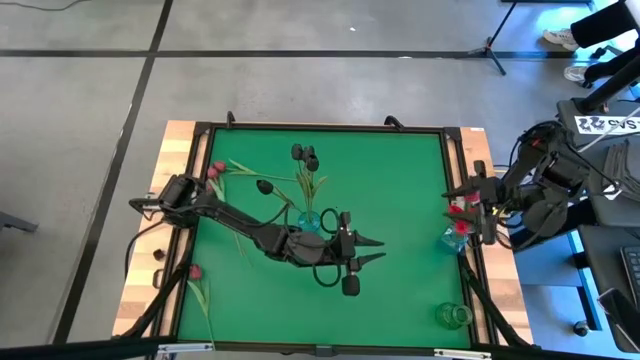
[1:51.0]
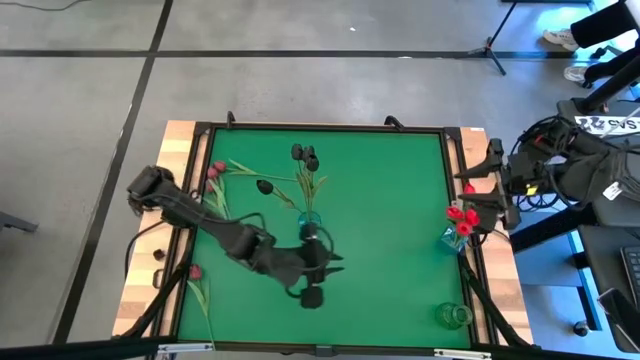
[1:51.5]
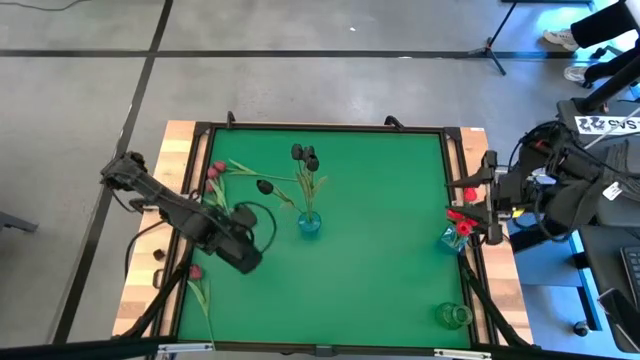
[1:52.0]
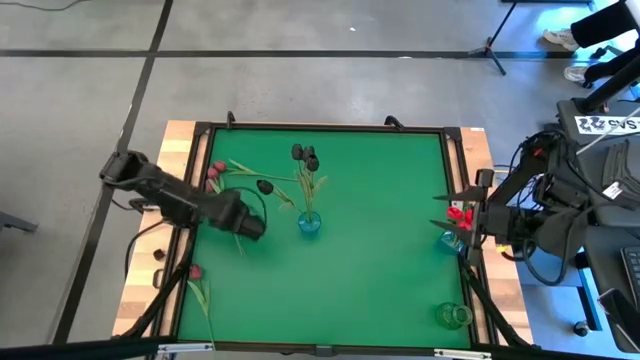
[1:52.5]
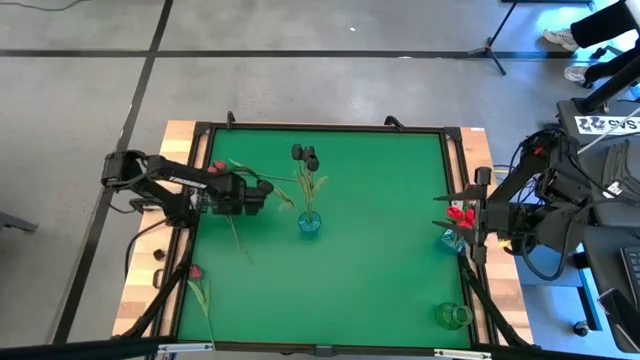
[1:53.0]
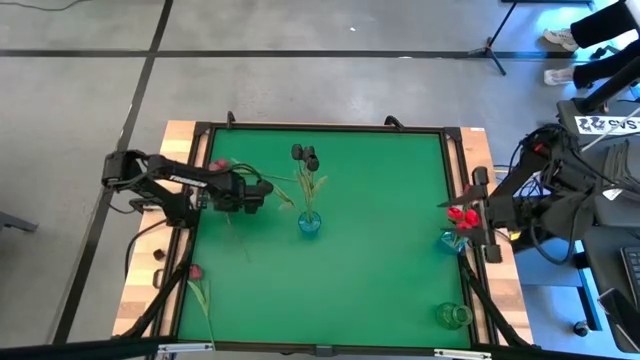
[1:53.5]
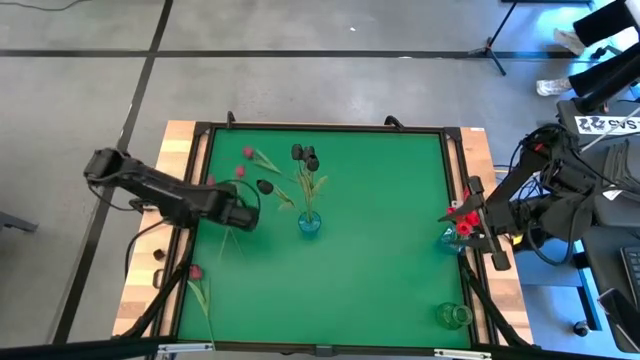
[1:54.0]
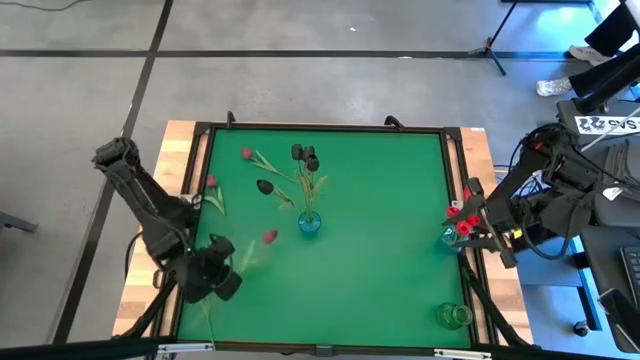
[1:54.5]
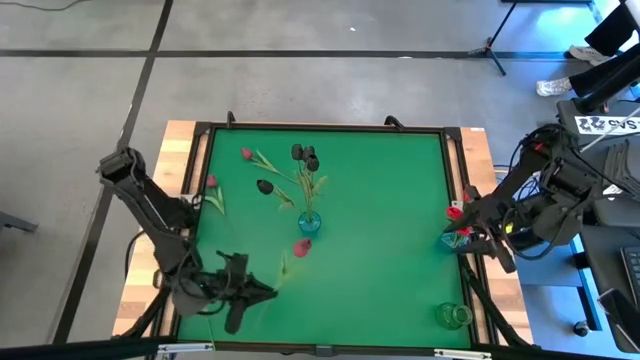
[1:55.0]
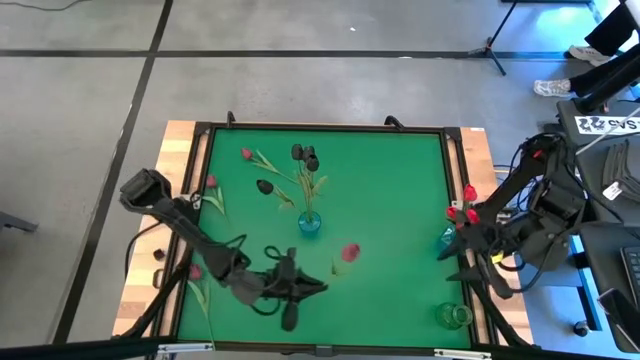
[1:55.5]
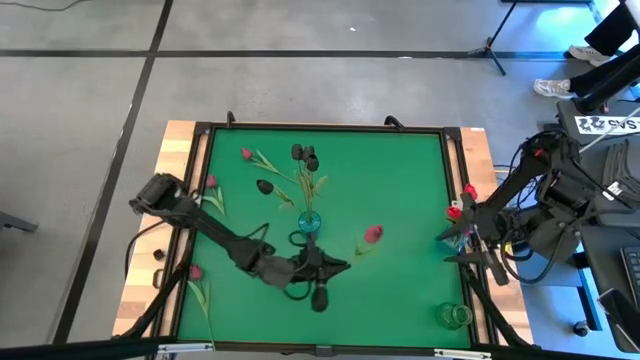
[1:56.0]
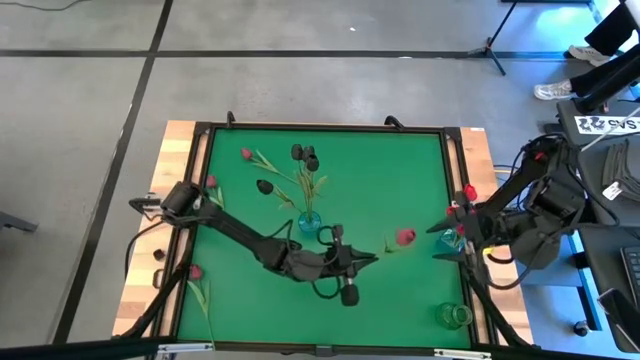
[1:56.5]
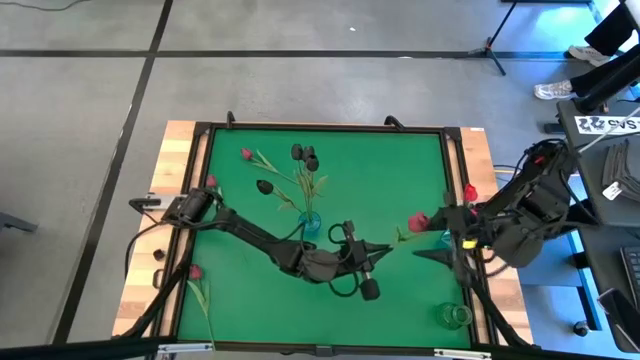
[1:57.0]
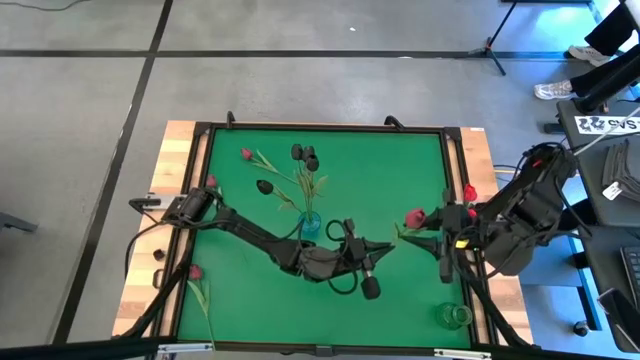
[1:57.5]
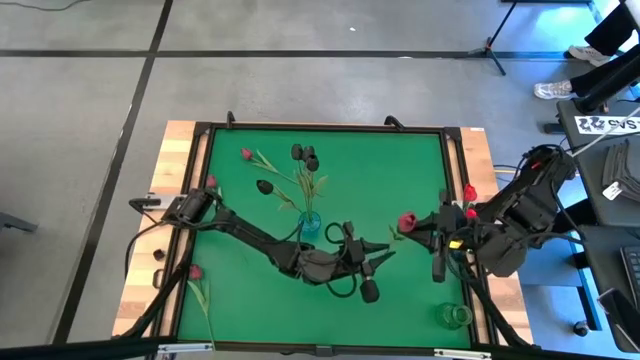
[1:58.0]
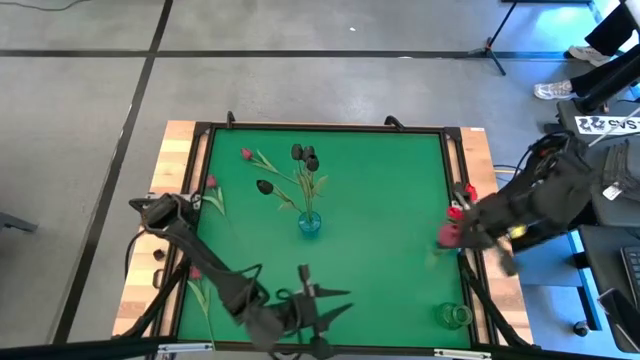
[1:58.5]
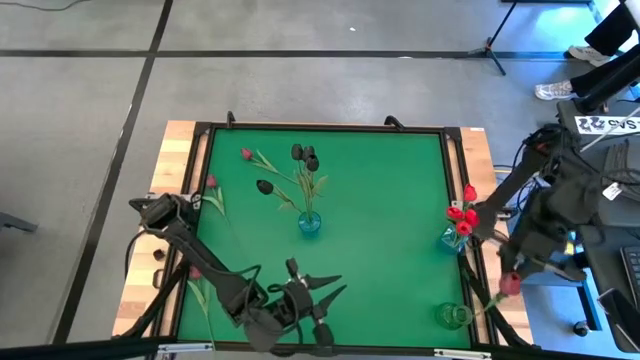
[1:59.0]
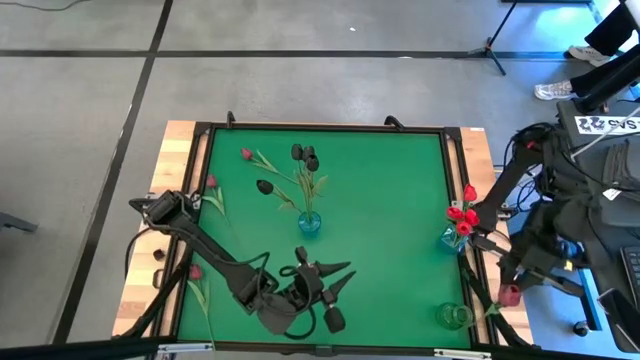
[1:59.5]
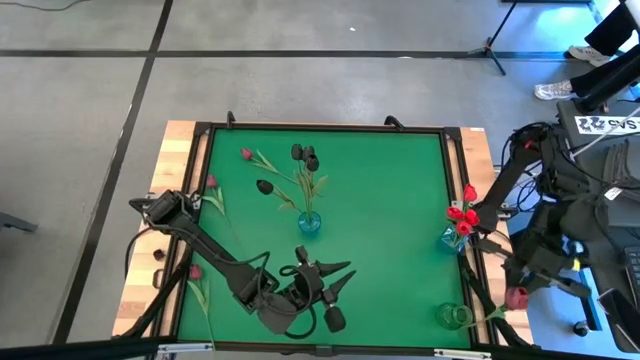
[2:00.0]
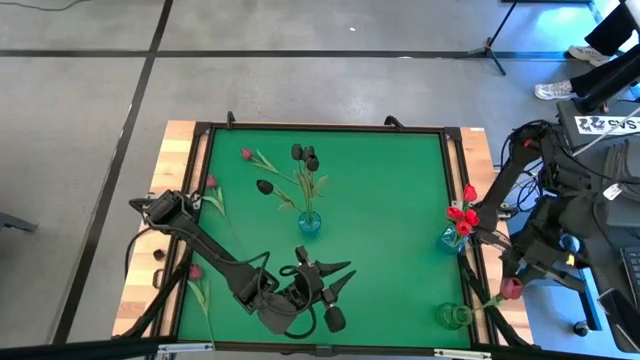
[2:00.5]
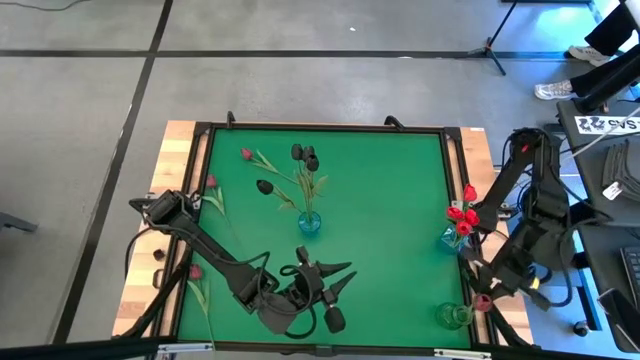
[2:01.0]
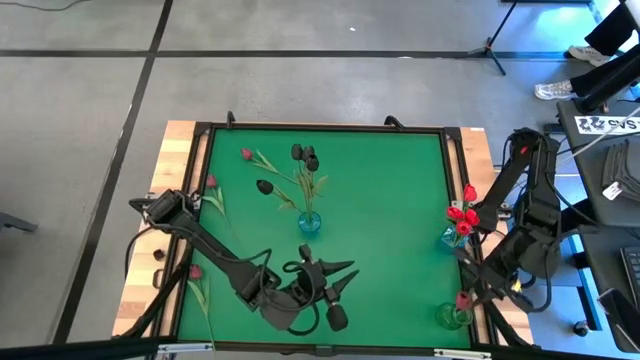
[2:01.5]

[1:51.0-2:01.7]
Task: Sort flowers into vase by color
Put the dark red flower into the green vase

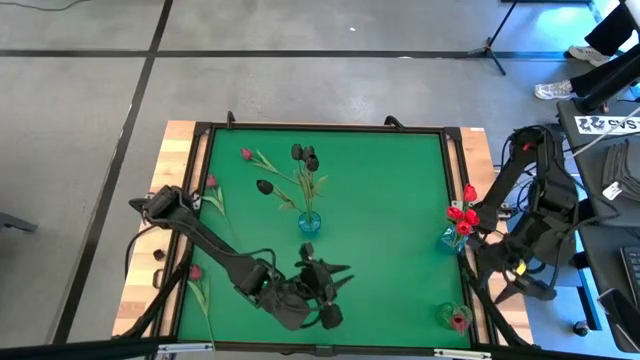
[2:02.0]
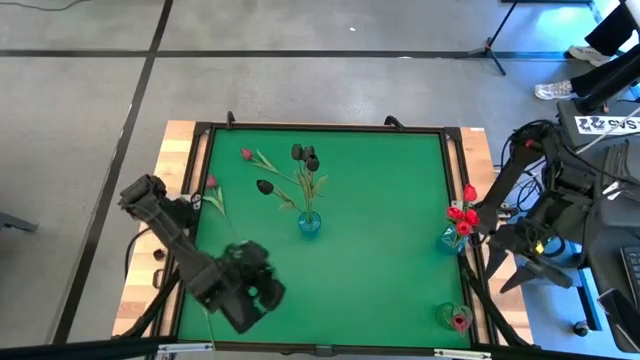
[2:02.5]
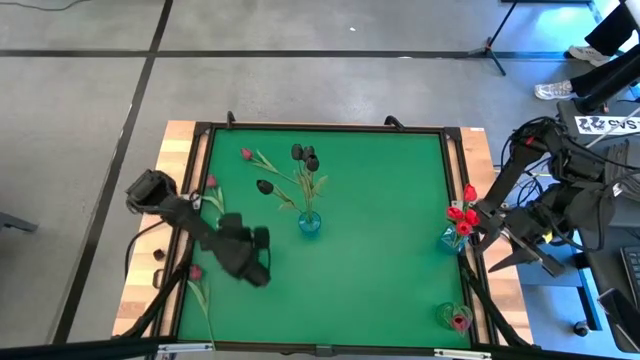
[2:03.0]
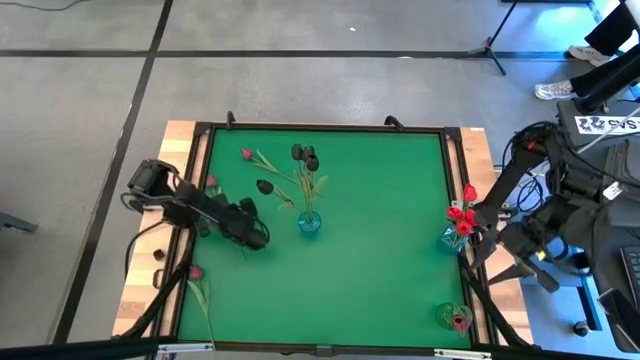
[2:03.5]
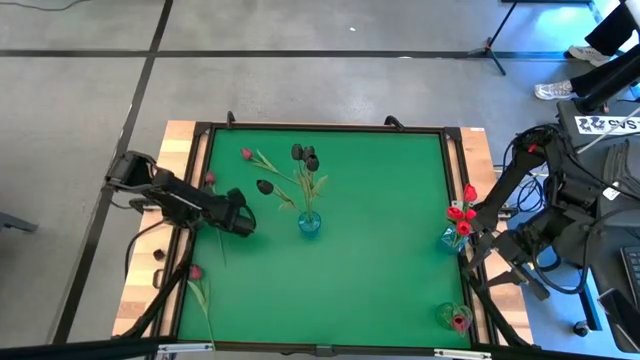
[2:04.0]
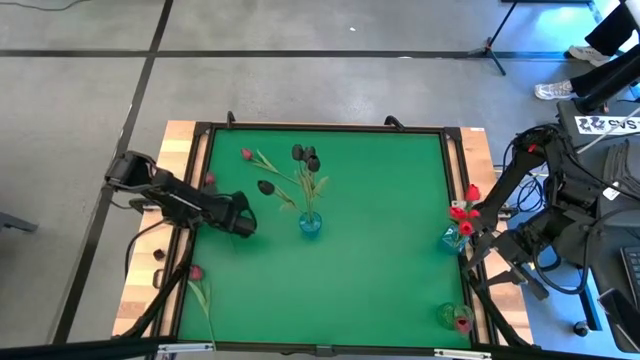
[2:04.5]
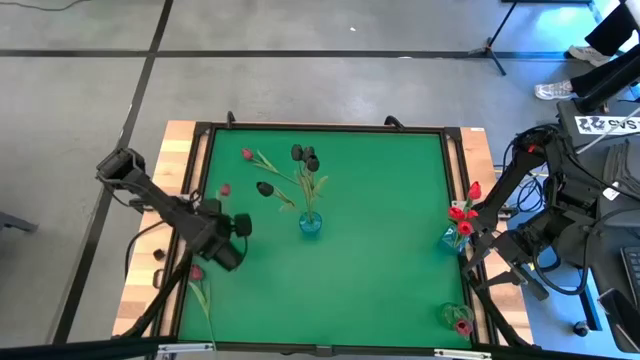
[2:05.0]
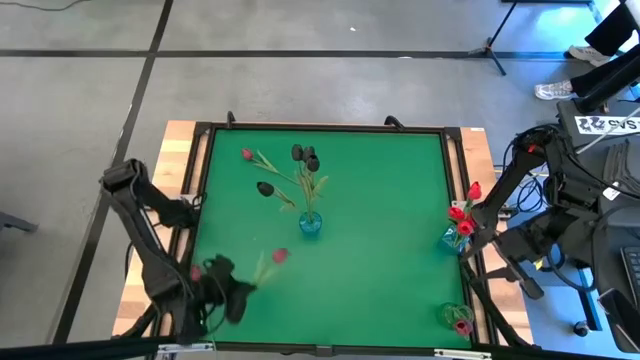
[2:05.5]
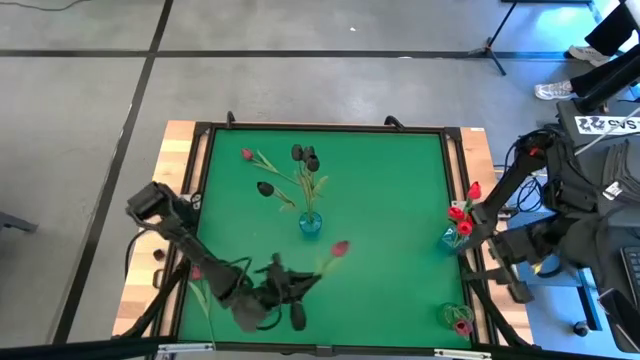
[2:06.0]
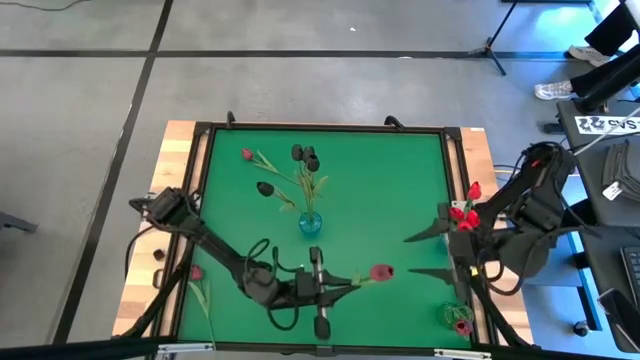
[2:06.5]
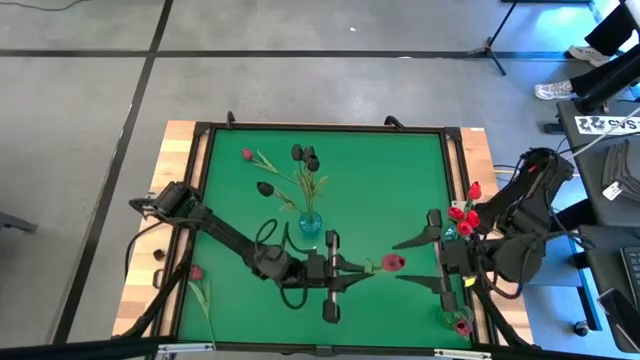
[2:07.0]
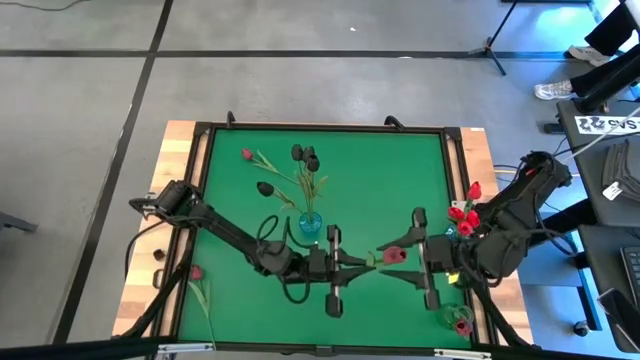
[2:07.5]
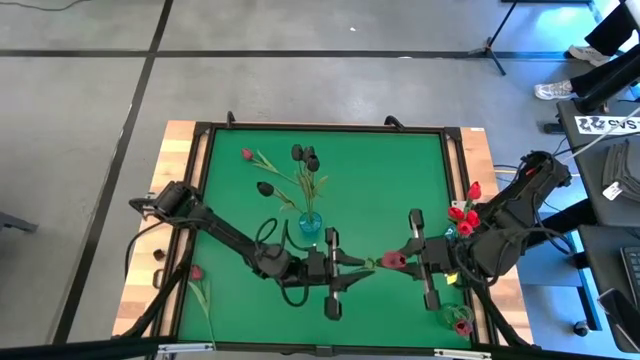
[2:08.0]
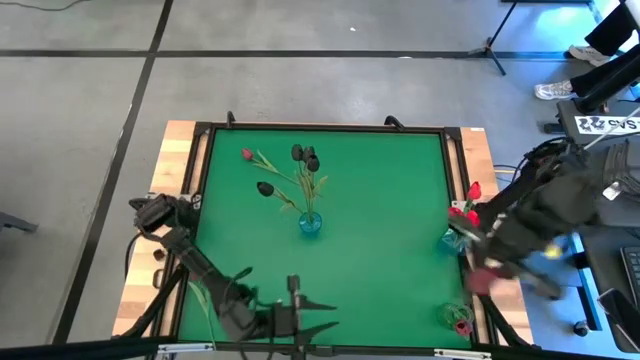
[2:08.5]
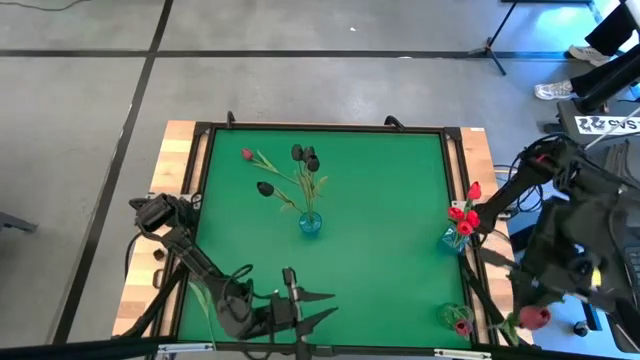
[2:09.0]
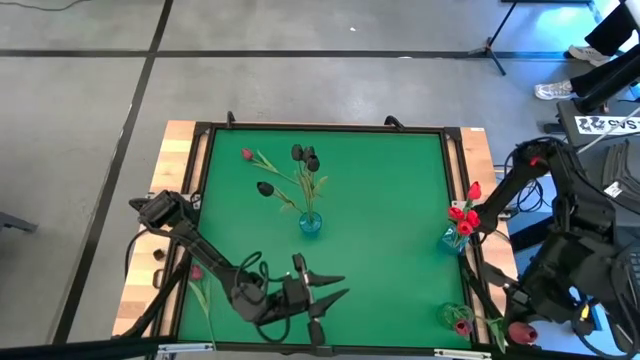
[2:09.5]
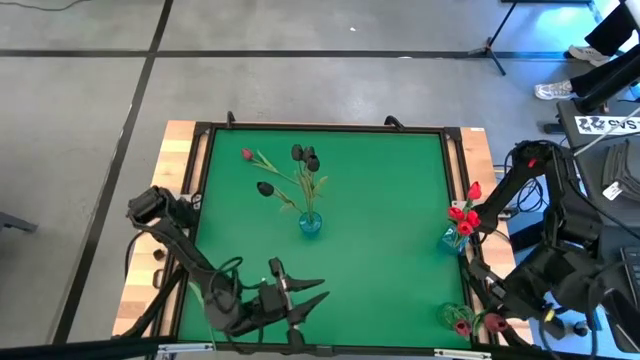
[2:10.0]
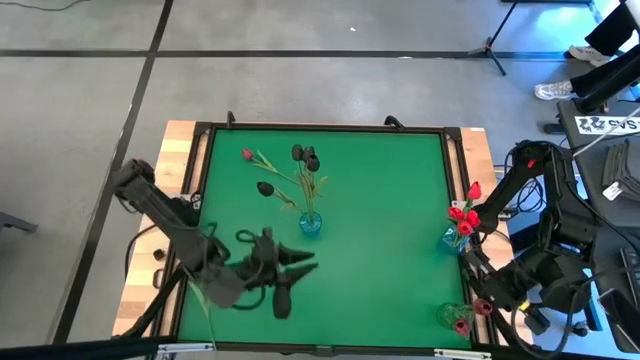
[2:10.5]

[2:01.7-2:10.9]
Put the dark red flower into the green vase

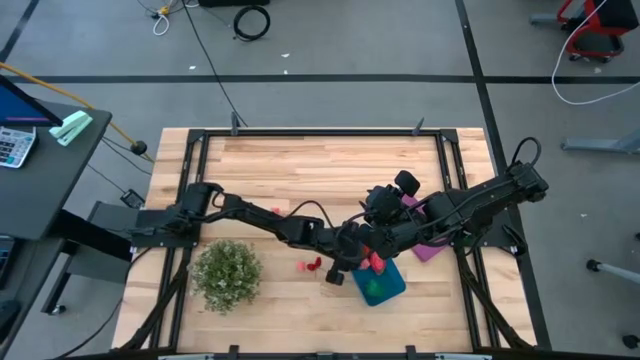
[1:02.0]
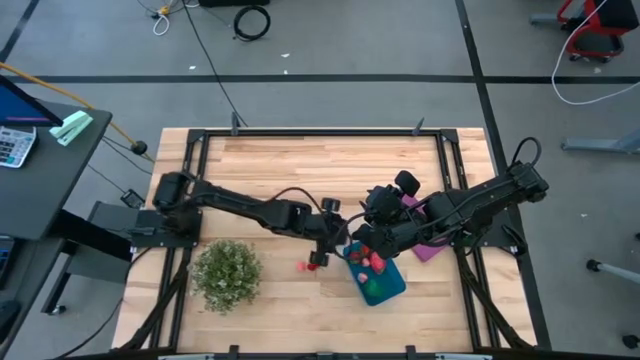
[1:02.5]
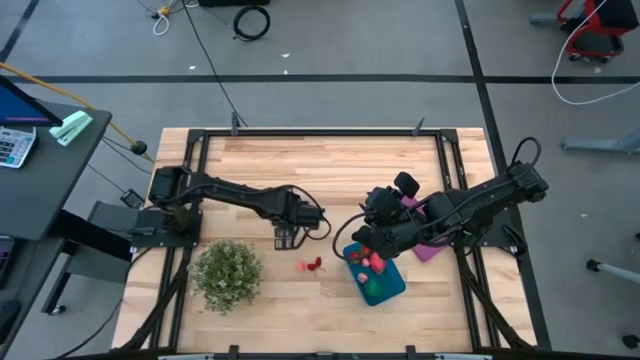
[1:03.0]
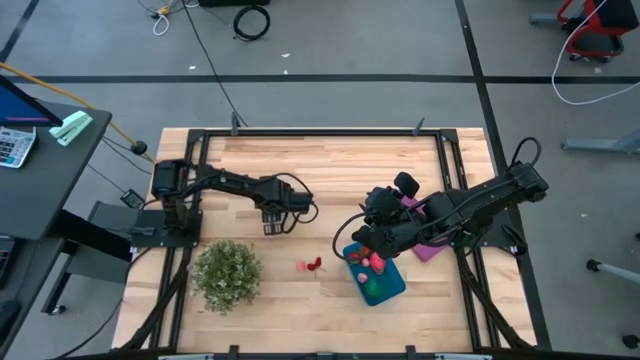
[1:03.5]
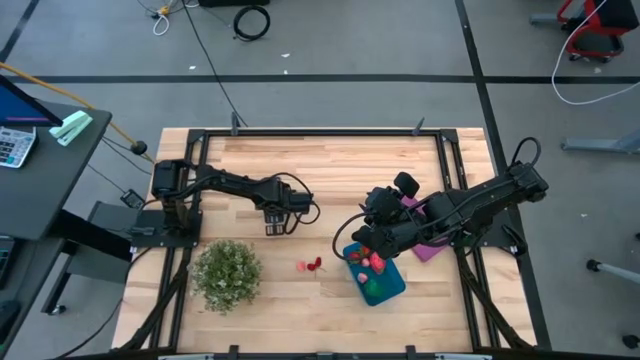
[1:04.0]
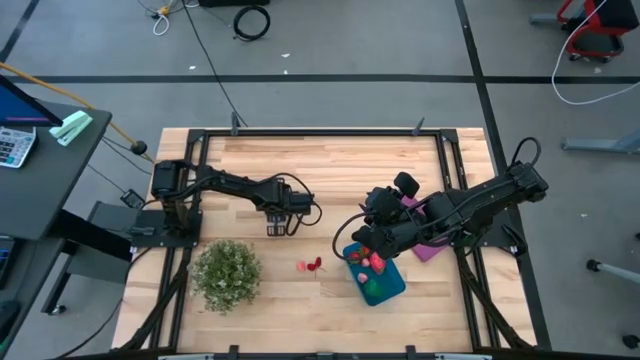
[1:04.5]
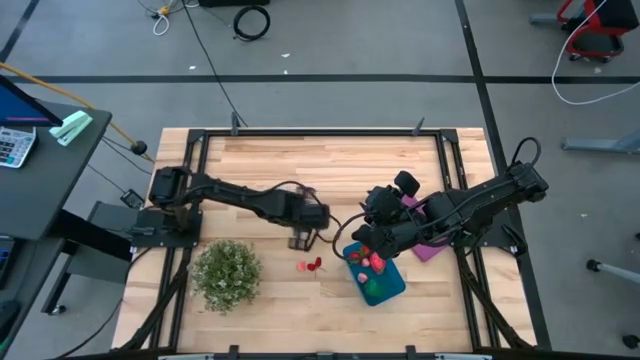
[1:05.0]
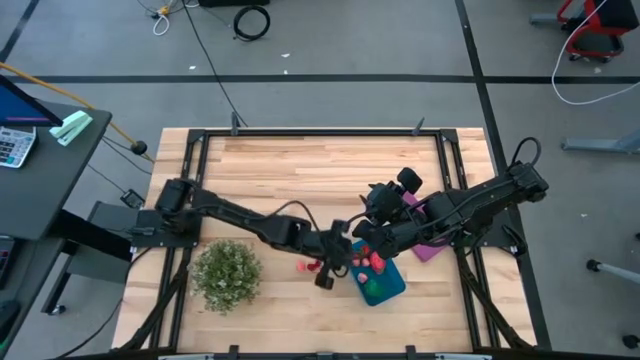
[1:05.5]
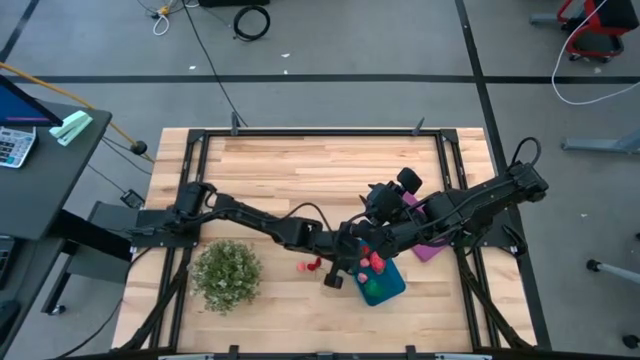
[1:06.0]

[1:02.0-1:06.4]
Task: Pick and placing Produce into tupperware
Put the pink peach into the blue bin
